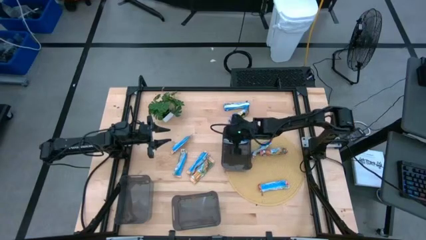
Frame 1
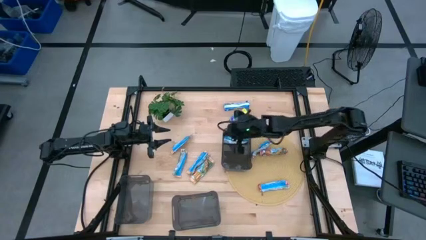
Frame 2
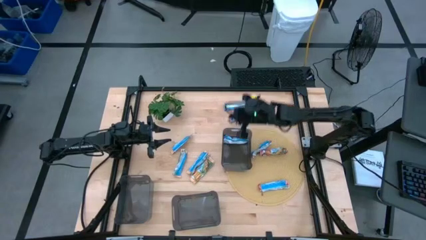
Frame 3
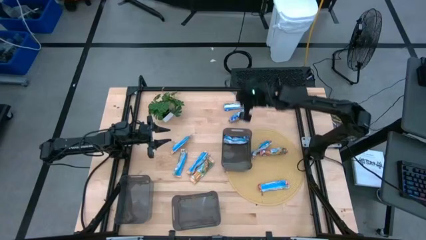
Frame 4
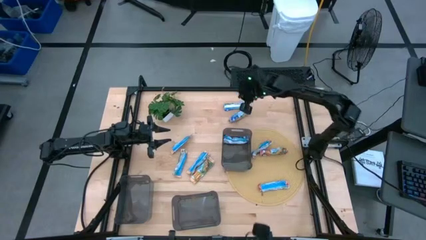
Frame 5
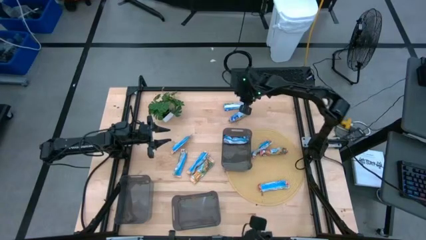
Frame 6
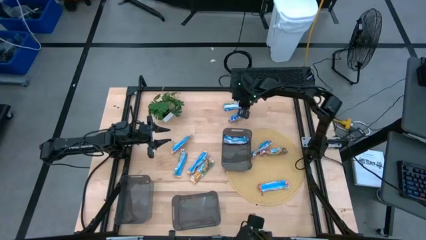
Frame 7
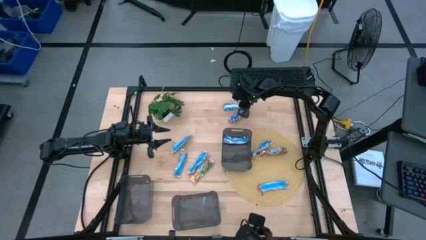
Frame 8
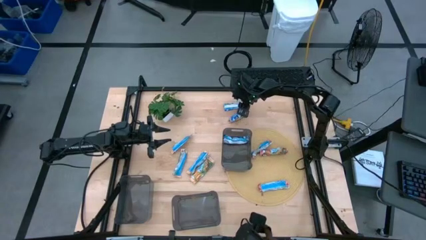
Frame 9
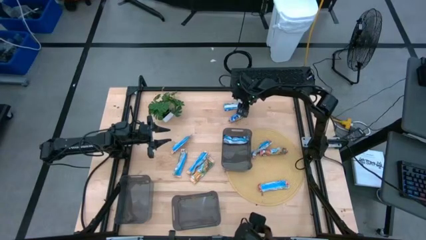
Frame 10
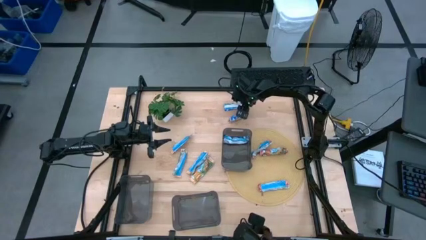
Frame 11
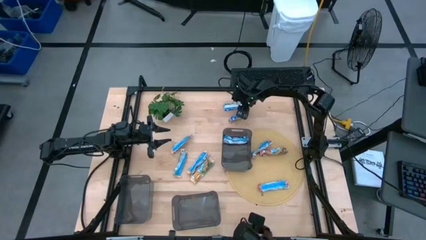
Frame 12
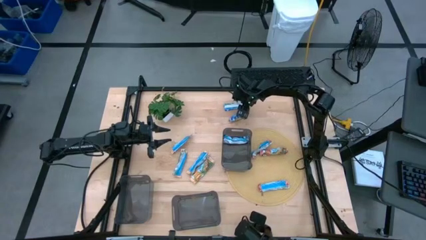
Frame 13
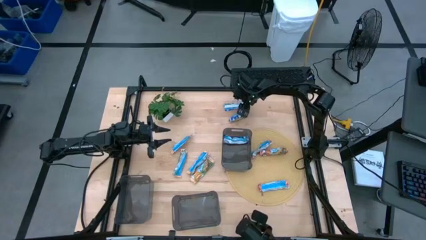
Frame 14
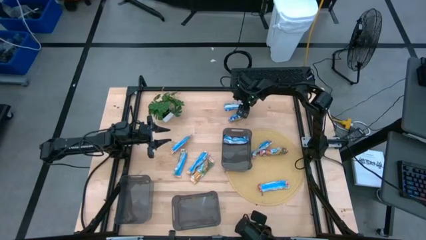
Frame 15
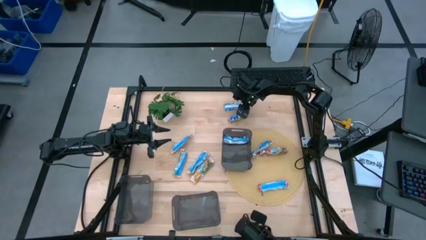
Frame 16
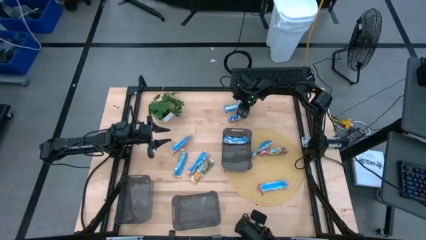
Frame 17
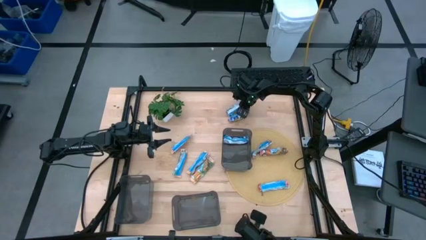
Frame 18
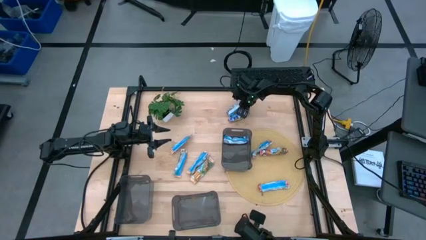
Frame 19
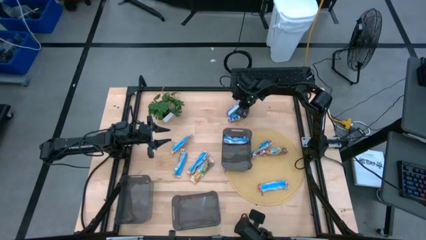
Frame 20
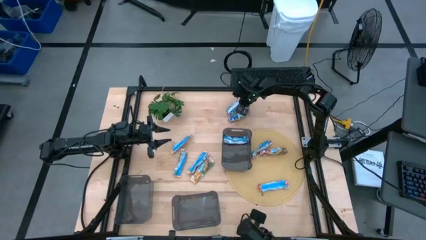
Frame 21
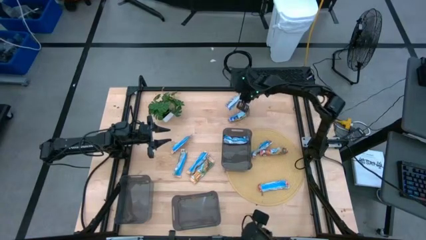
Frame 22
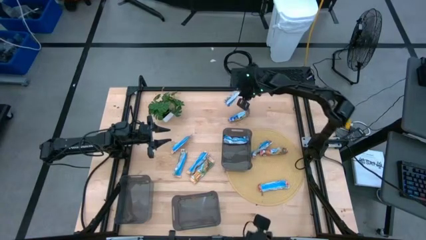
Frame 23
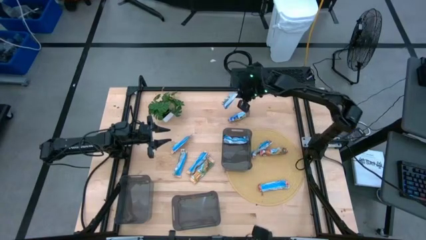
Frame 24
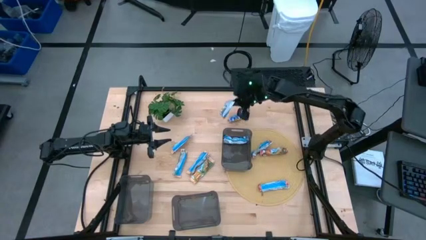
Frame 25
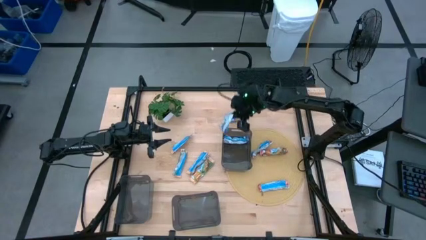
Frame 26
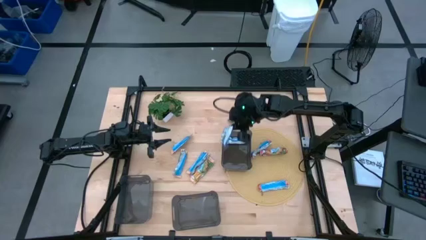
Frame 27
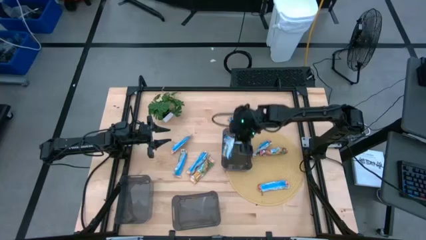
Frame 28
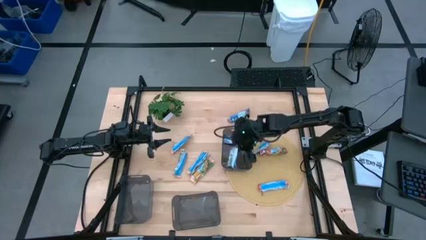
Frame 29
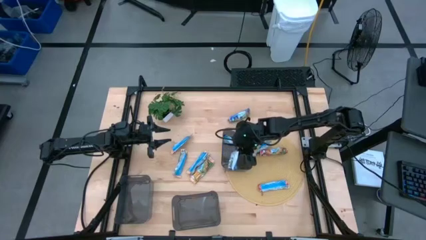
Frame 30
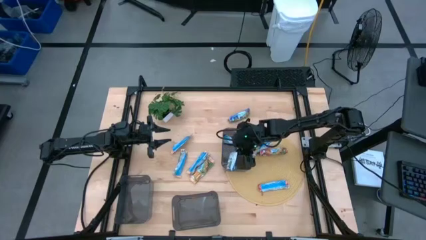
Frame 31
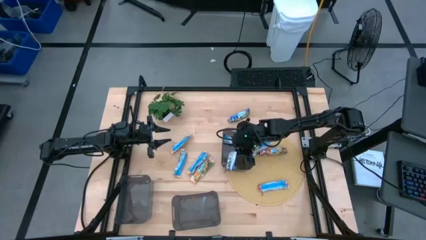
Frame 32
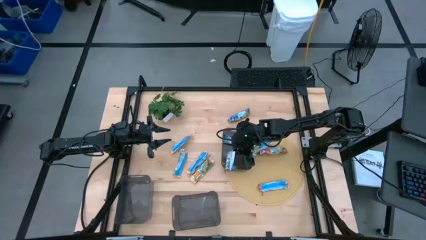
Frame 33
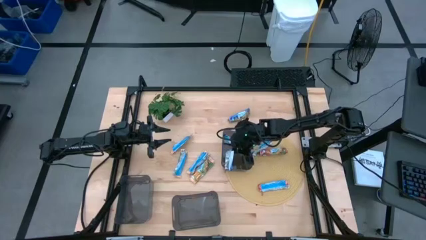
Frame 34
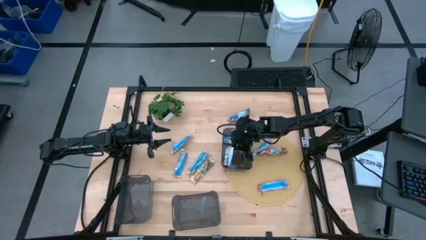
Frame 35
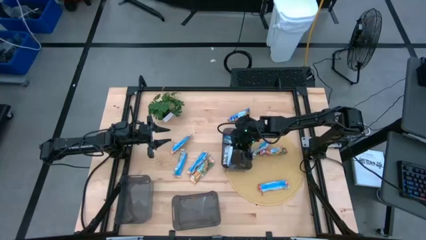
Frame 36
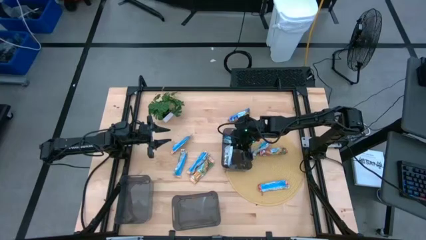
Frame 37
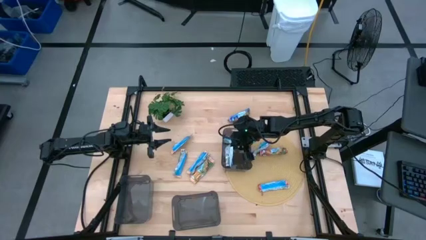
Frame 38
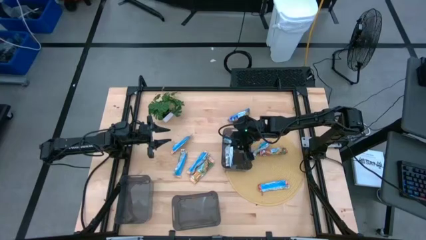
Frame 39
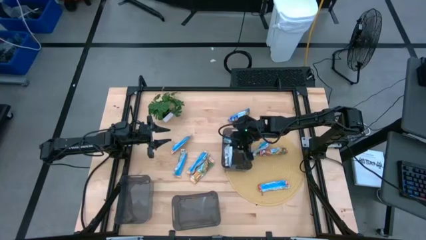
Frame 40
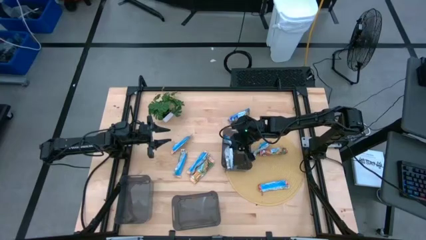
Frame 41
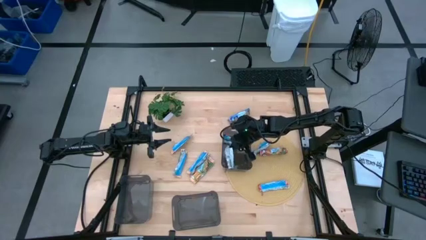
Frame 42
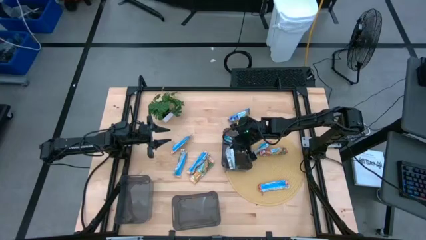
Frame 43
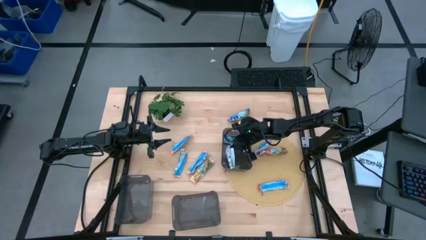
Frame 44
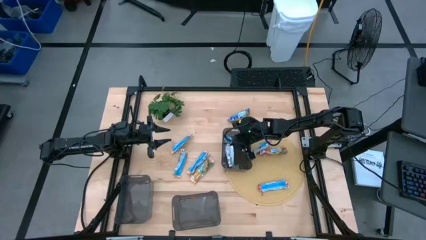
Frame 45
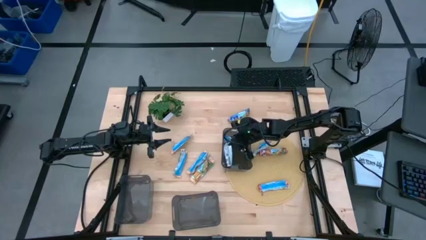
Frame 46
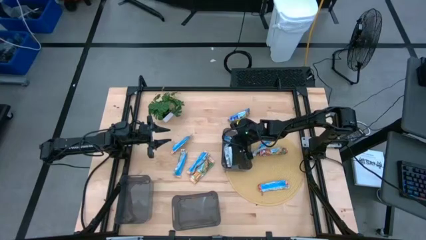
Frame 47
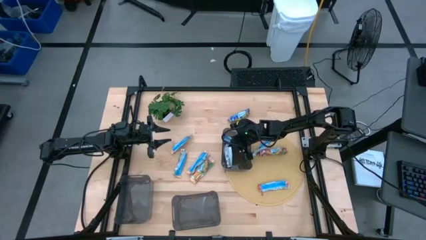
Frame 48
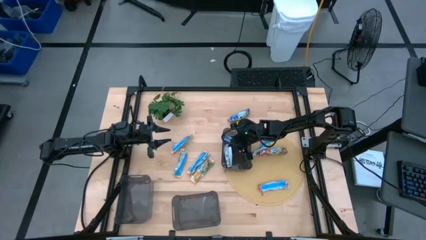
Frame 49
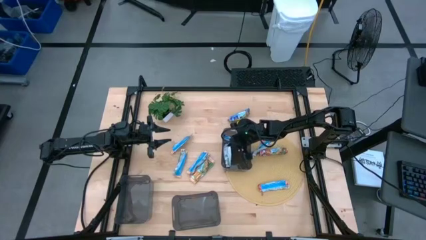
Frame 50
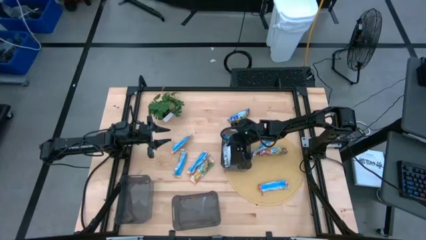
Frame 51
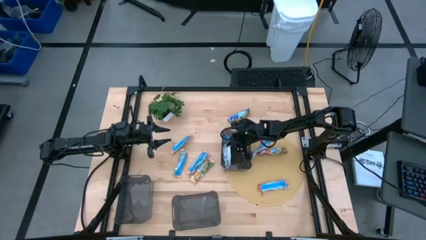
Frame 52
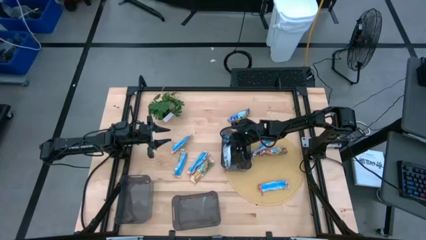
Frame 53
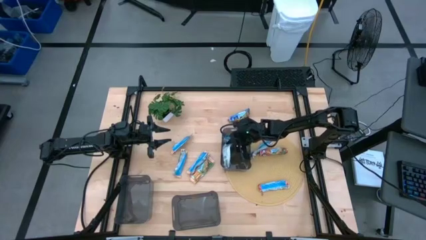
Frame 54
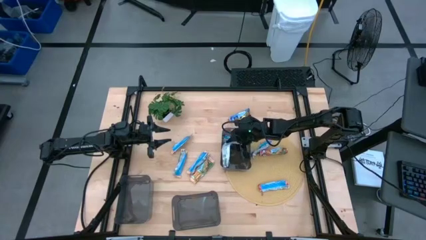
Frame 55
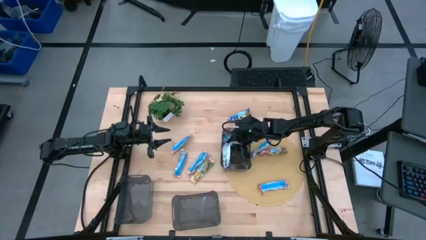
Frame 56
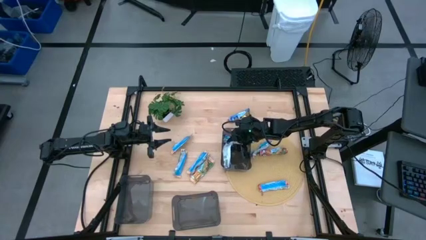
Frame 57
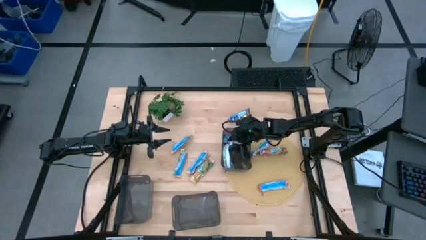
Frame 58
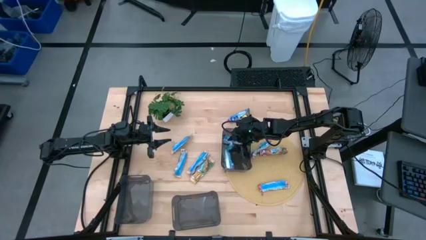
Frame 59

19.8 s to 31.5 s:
Task: Pick and place Granola Bars by type
Put the top blue granola bar into the top right black bin
